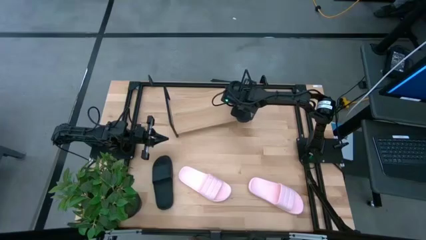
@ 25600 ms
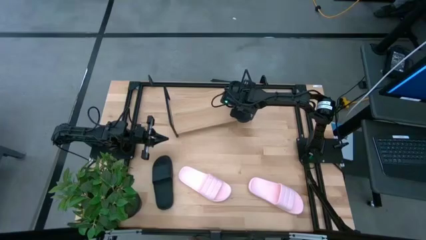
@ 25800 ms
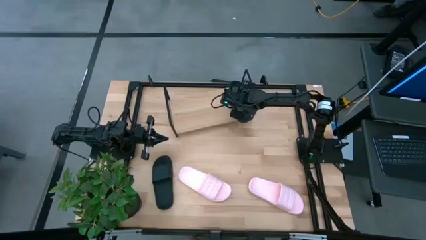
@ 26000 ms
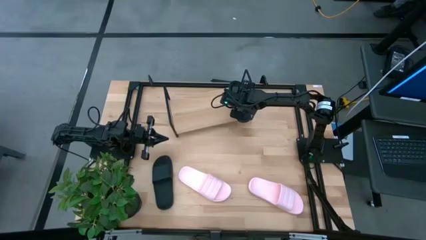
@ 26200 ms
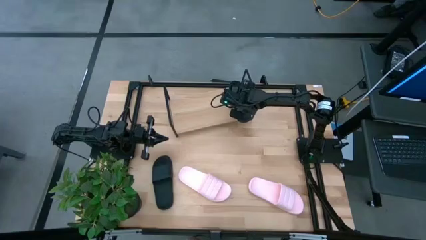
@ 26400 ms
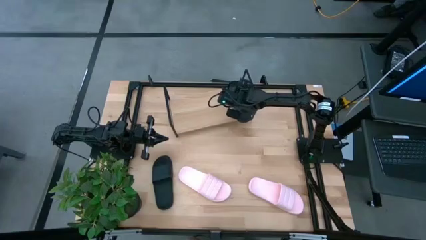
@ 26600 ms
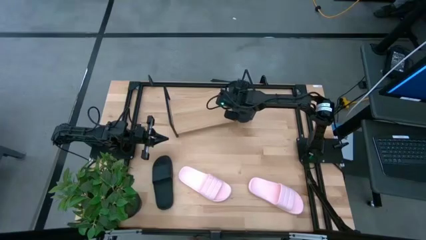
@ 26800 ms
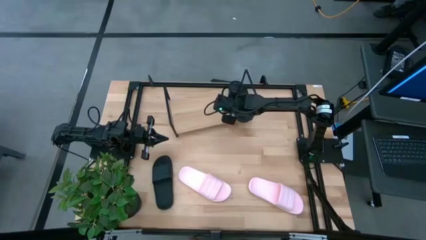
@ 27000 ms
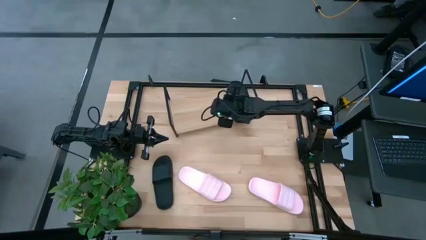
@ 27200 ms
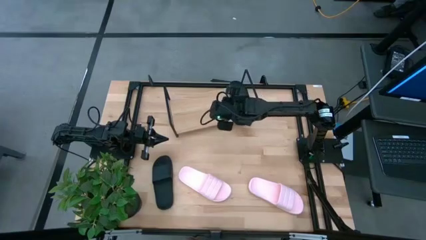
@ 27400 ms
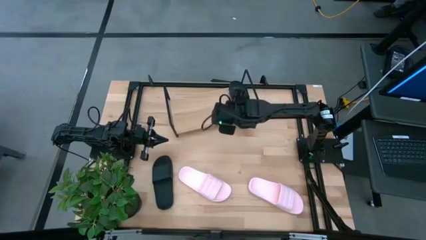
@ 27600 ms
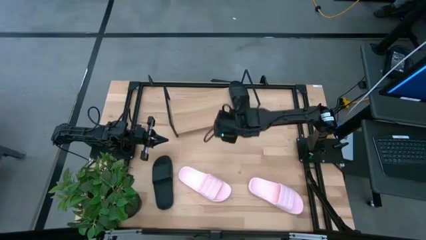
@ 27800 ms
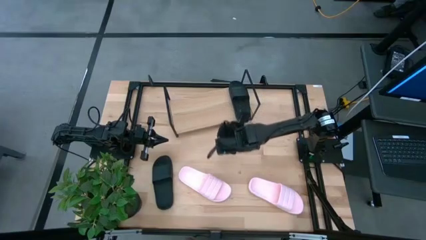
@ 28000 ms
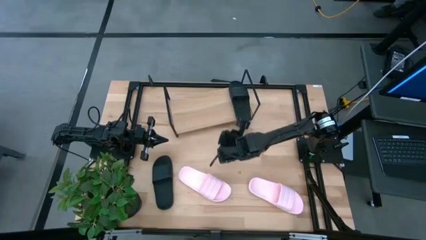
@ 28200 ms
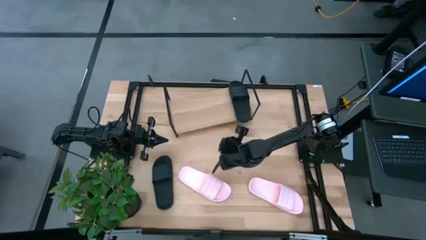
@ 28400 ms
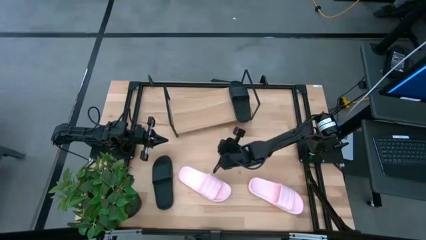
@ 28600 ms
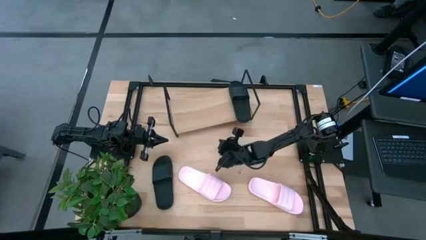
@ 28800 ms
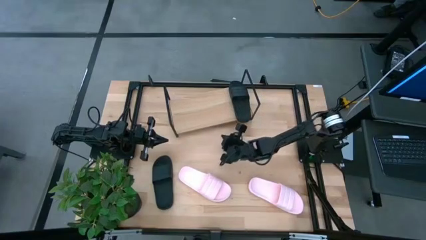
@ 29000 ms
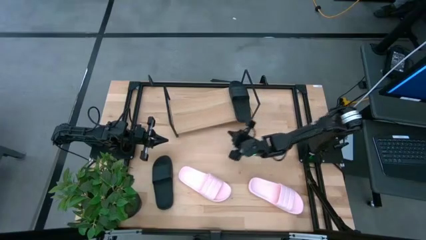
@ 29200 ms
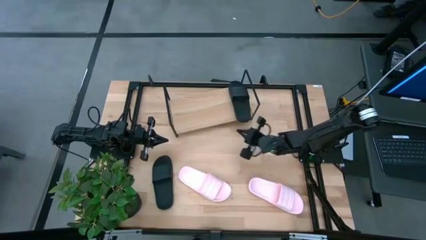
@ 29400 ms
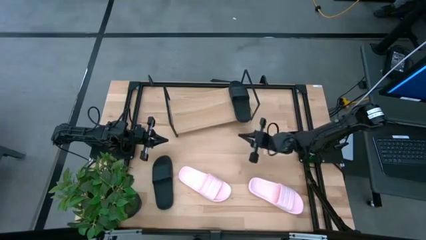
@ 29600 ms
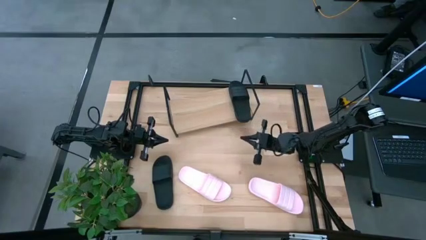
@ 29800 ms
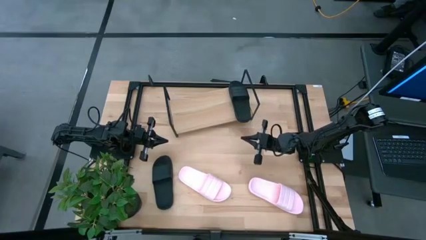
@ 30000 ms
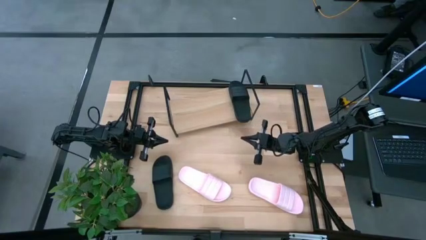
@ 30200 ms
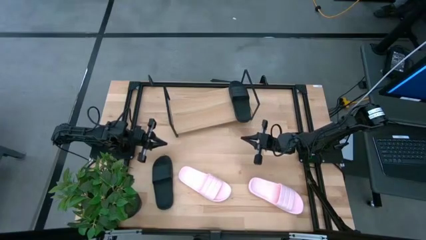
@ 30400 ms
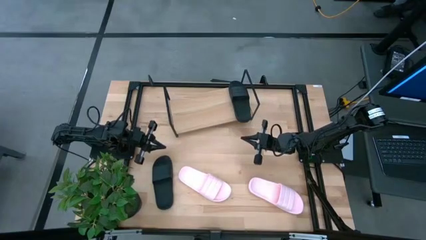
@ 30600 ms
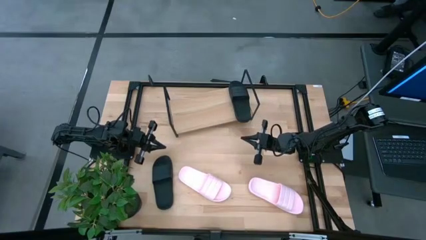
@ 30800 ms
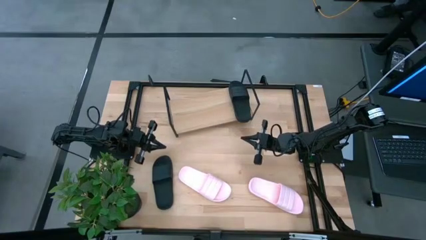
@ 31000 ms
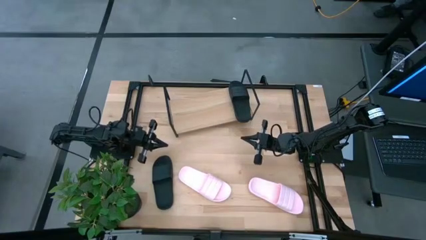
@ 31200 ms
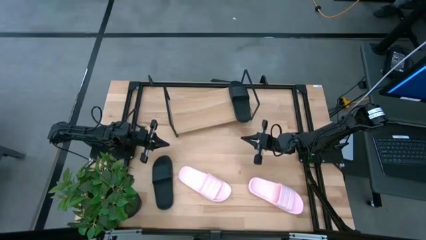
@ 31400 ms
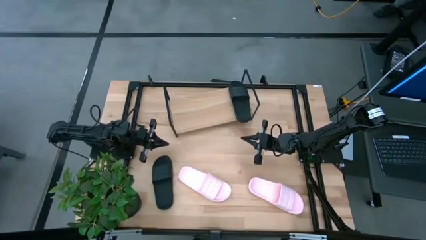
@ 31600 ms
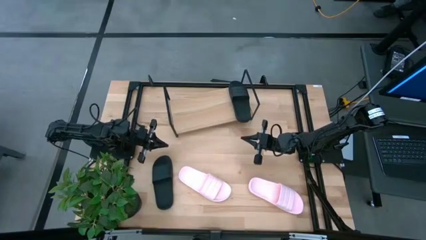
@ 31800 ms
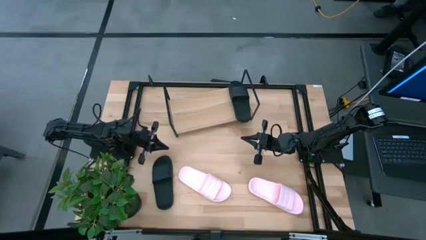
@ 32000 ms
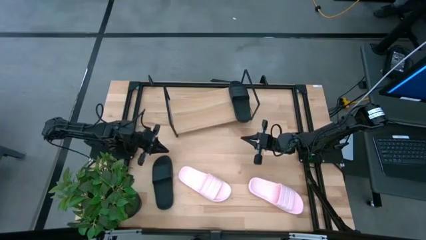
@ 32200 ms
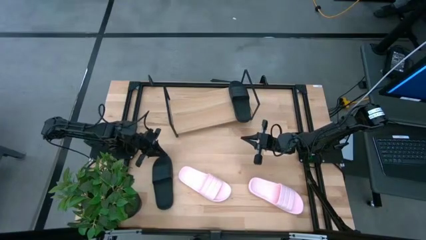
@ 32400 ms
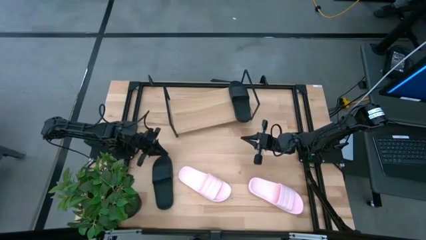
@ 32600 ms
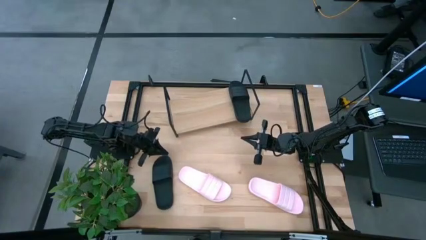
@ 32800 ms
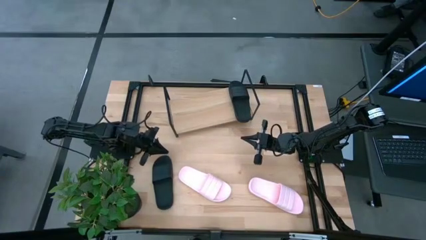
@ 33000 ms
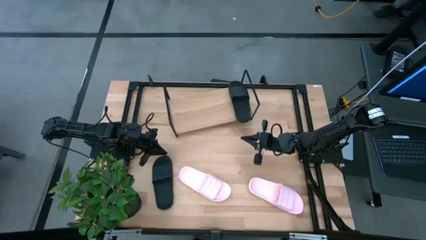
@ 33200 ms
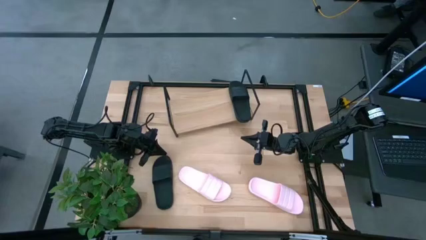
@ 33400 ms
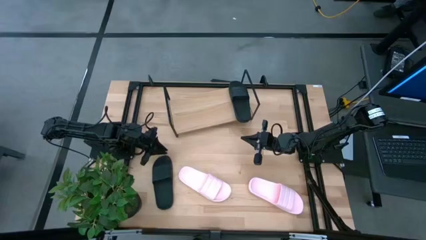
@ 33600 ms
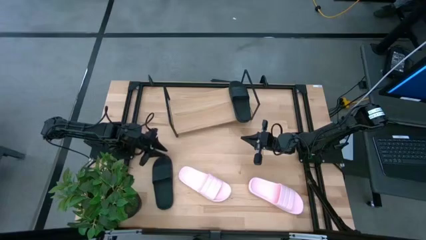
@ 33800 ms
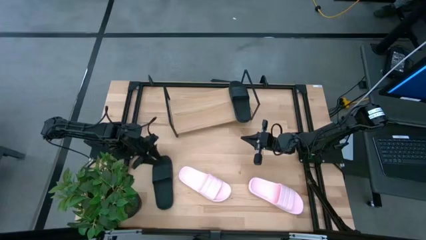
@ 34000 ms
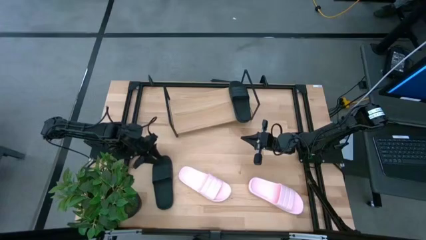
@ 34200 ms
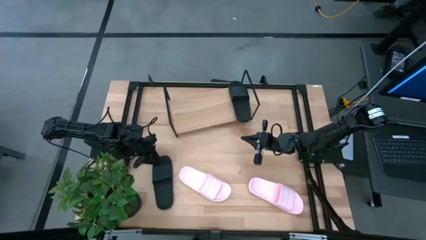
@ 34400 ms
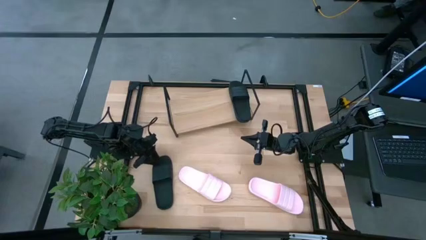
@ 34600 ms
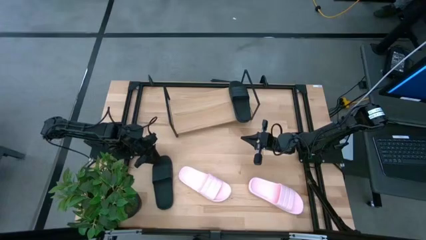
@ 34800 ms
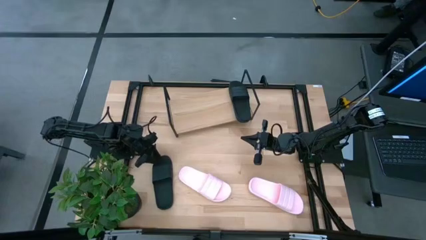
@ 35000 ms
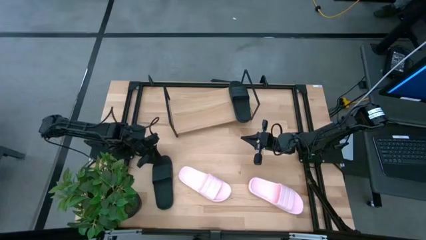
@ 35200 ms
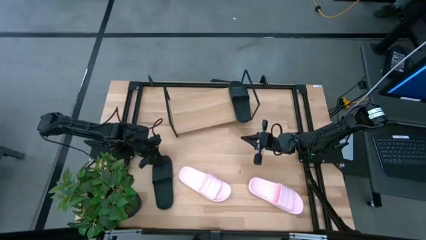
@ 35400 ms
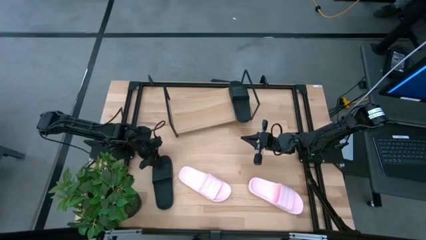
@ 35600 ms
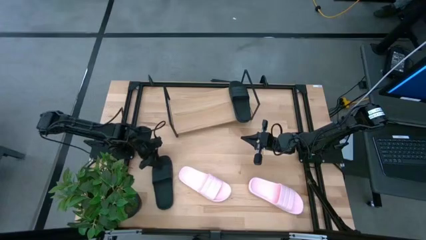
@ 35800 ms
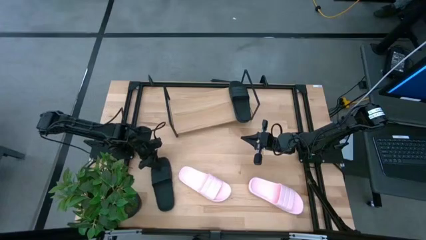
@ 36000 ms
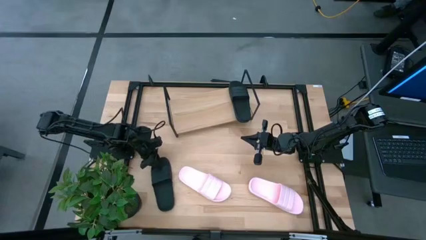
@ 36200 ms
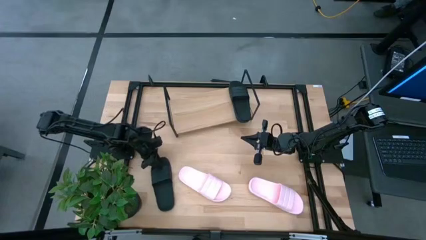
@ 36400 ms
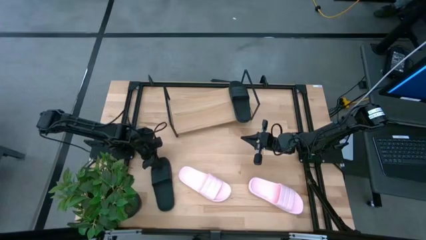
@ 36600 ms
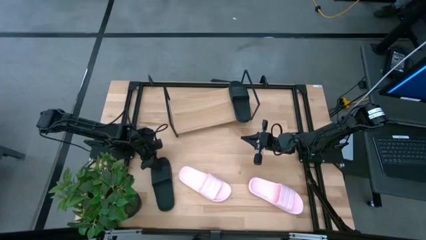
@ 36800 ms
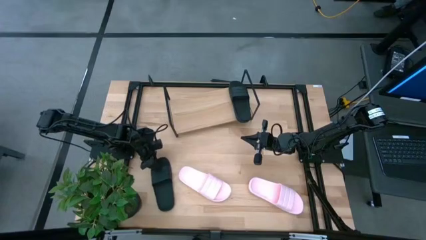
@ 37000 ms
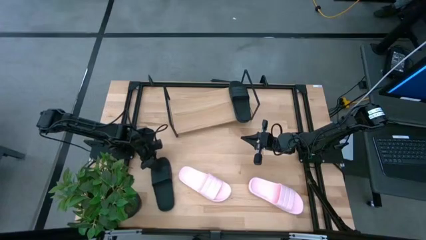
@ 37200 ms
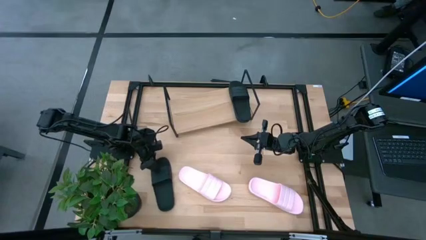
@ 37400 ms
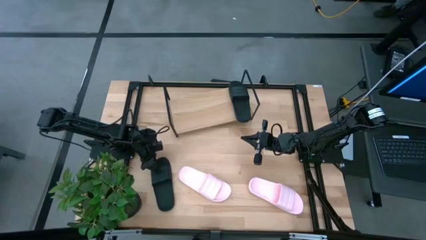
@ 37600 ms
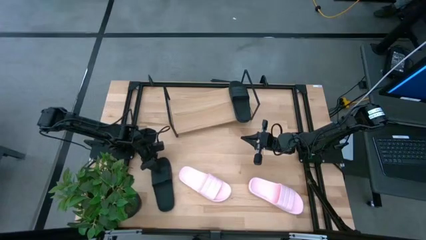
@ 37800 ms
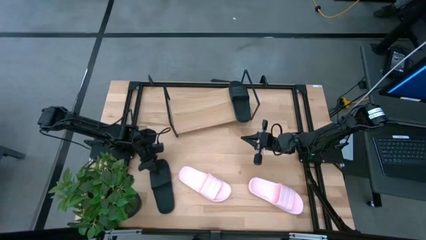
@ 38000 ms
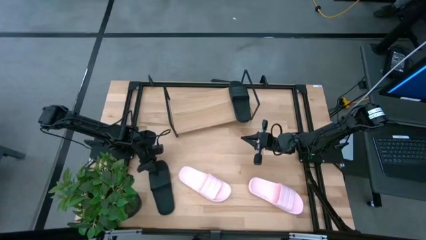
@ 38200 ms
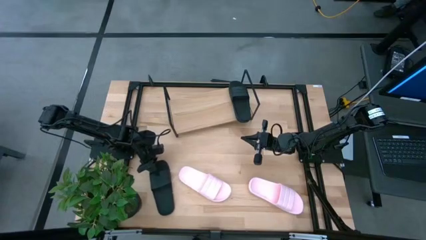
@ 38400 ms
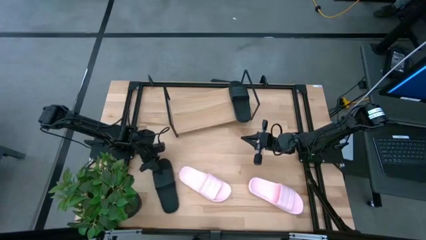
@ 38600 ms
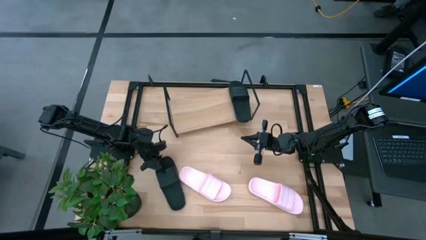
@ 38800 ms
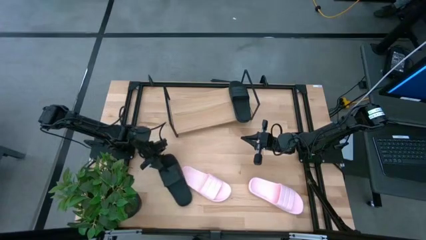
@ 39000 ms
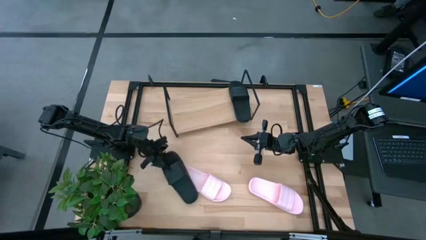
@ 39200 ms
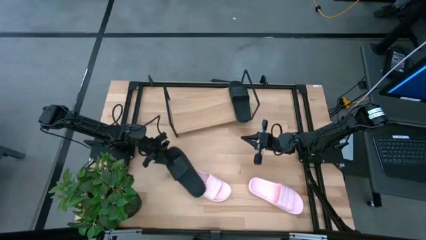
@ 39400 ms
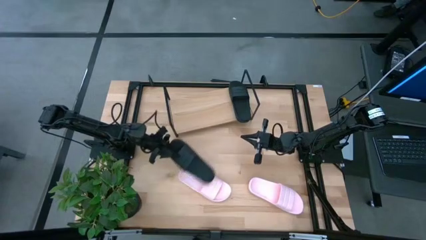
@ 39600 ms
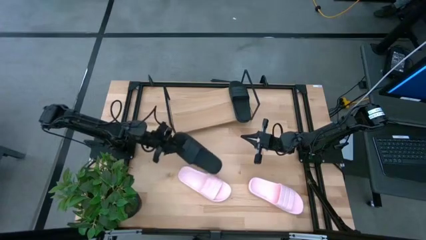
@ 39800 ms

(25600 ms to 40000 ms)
Task: Pick and place slides into the shelf
Put the black slipper on the shelf
